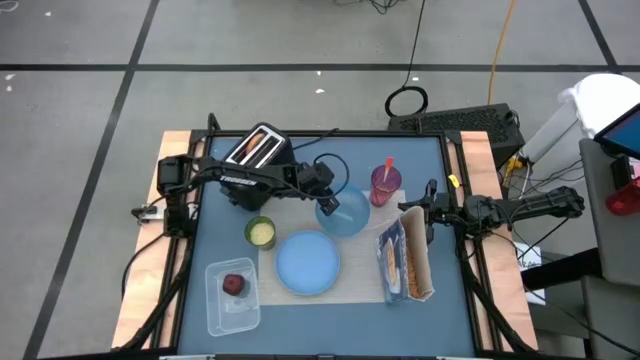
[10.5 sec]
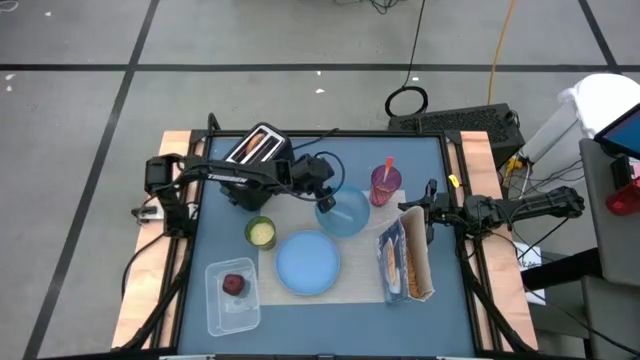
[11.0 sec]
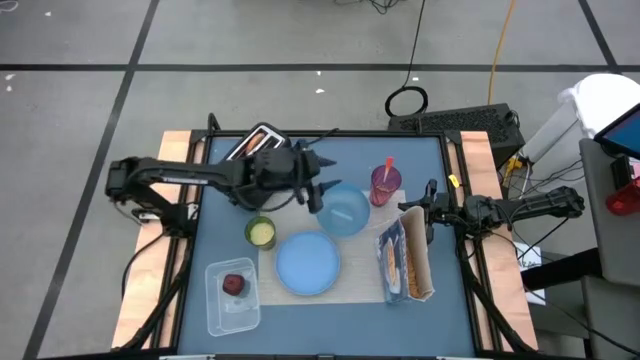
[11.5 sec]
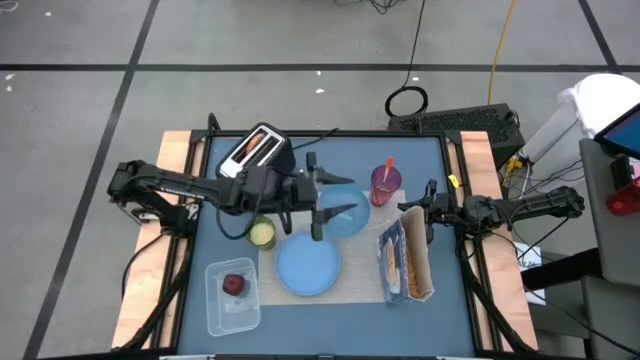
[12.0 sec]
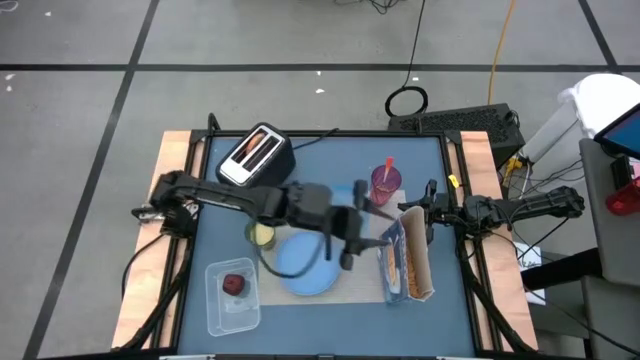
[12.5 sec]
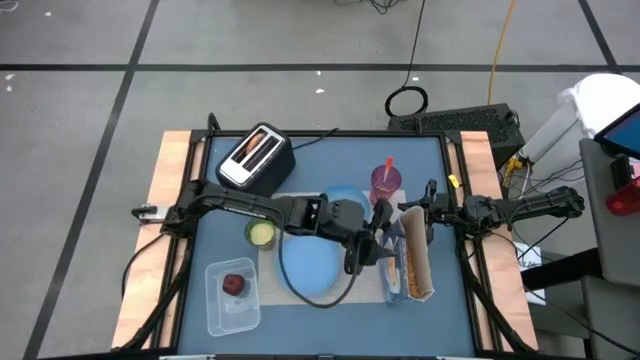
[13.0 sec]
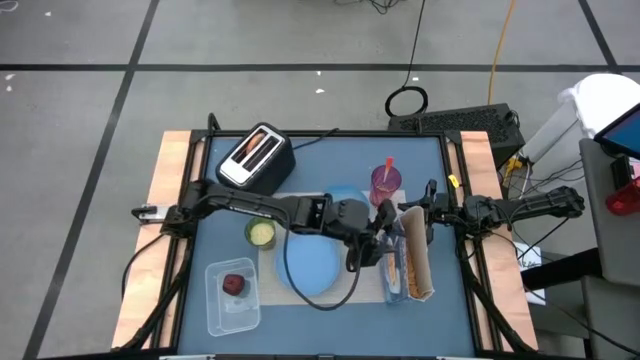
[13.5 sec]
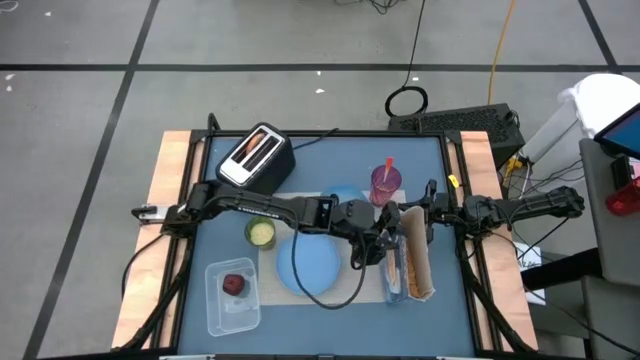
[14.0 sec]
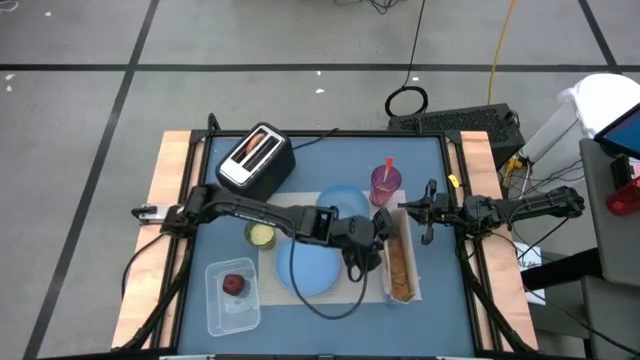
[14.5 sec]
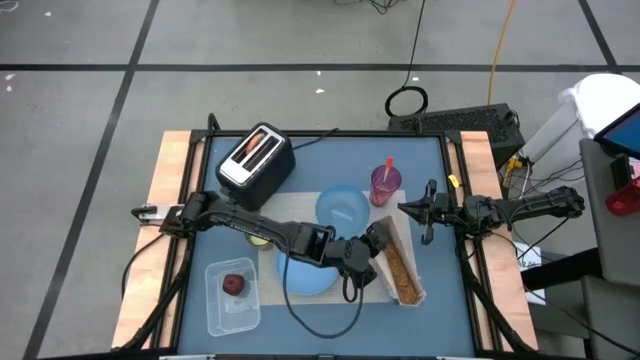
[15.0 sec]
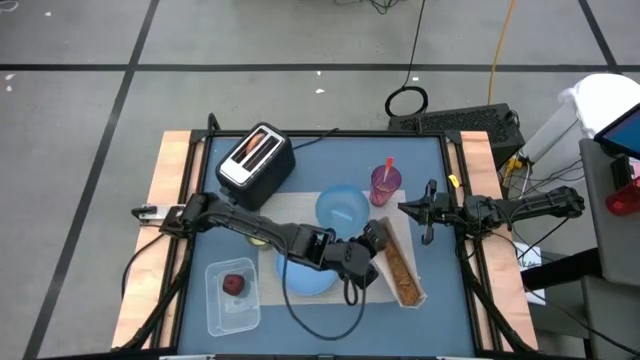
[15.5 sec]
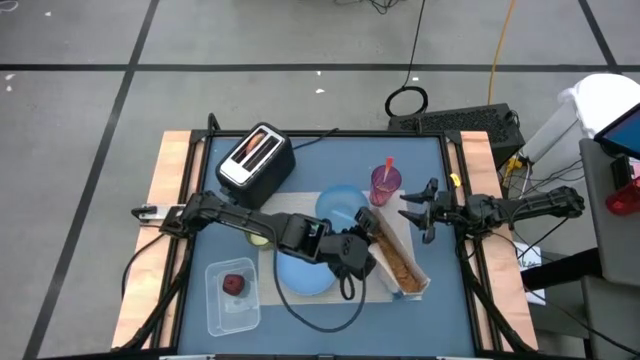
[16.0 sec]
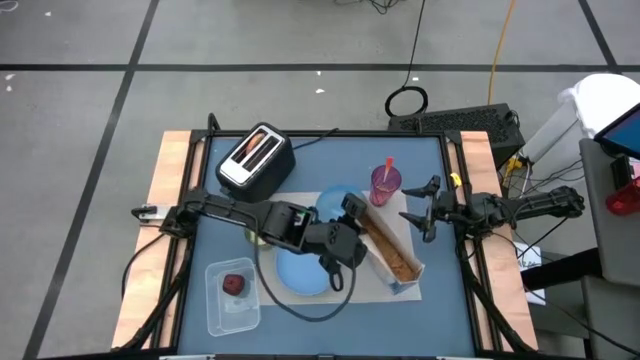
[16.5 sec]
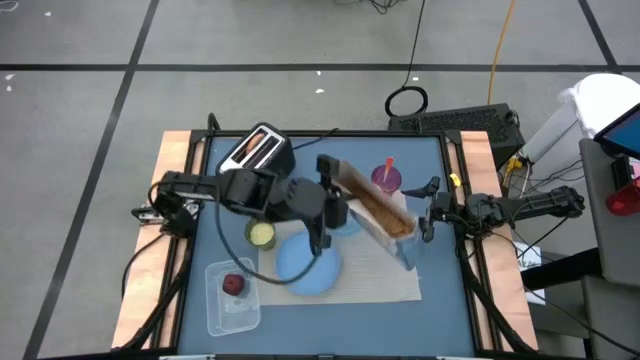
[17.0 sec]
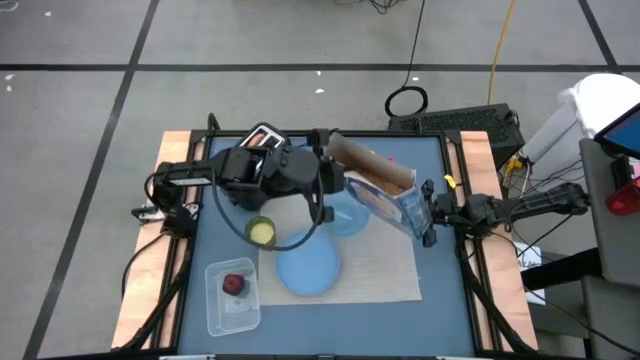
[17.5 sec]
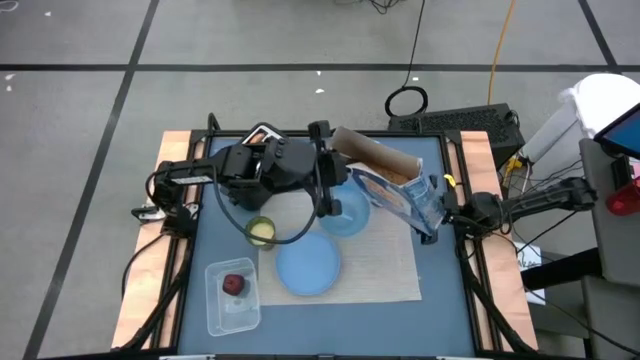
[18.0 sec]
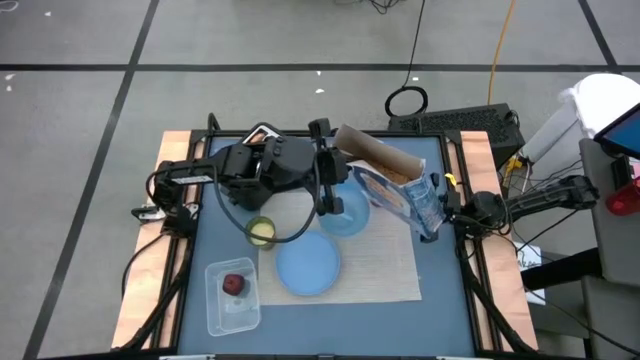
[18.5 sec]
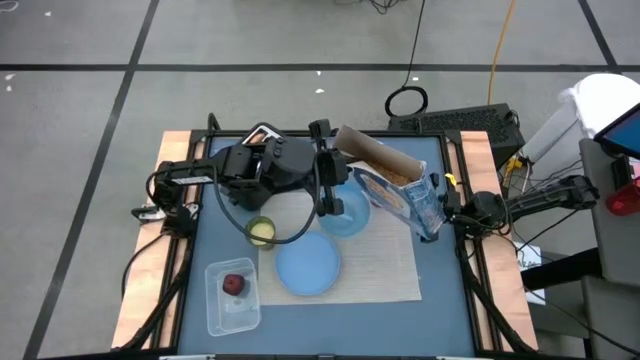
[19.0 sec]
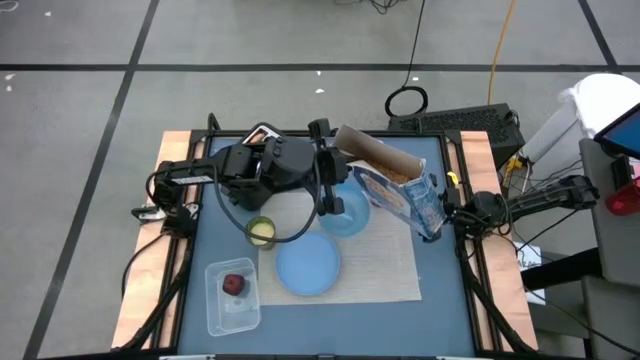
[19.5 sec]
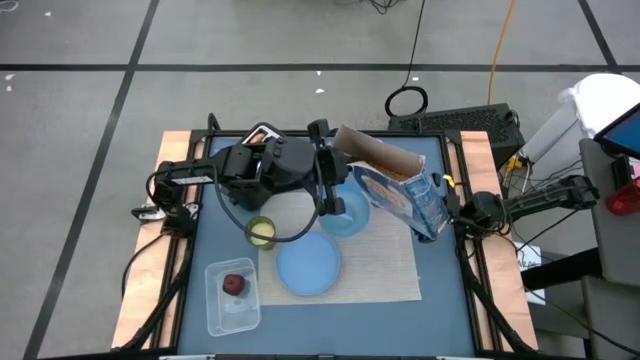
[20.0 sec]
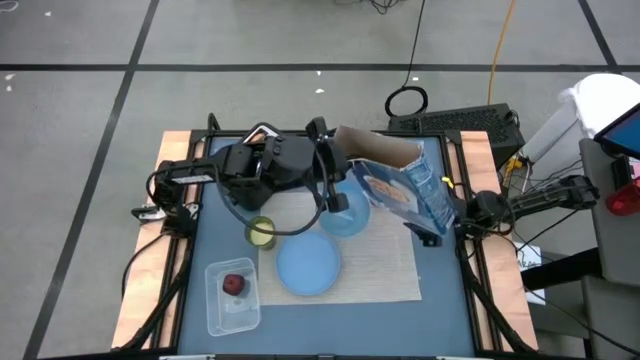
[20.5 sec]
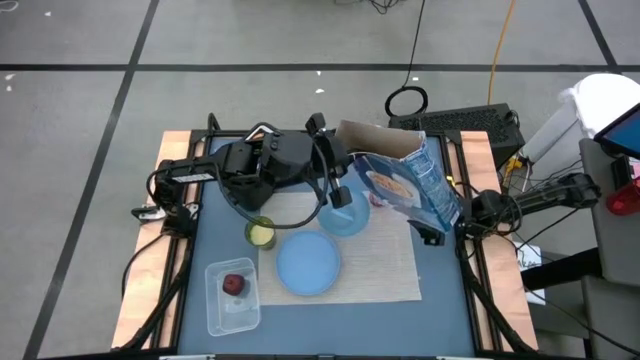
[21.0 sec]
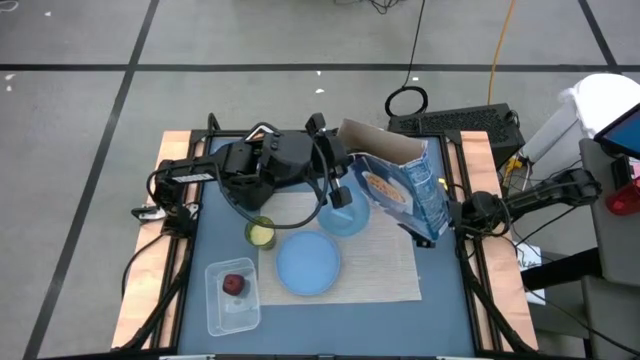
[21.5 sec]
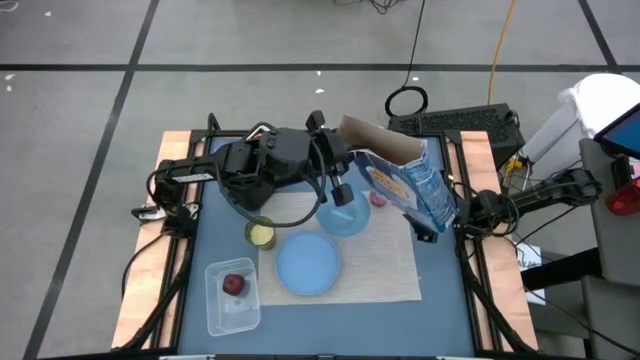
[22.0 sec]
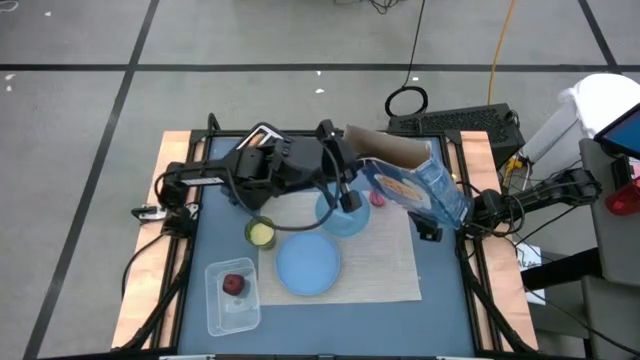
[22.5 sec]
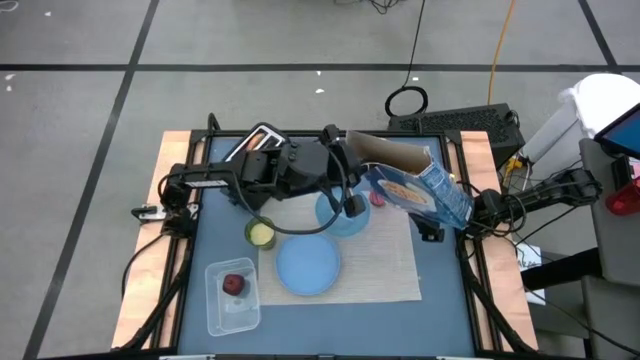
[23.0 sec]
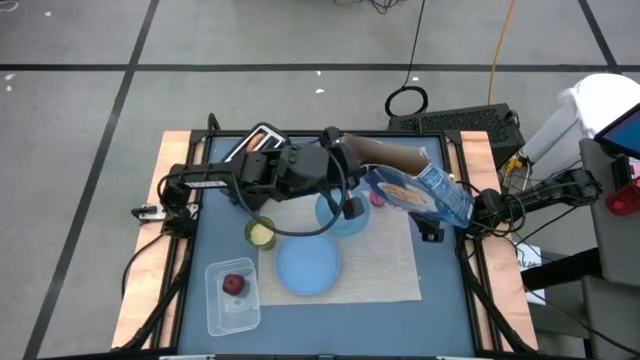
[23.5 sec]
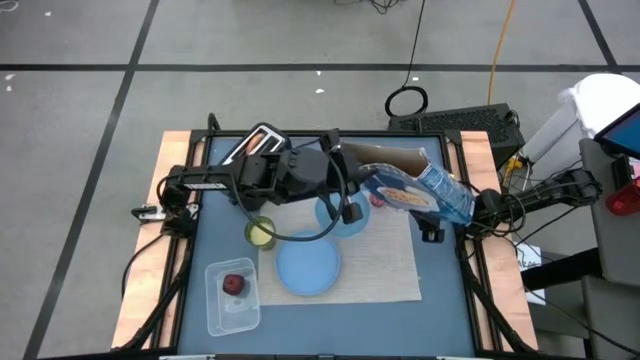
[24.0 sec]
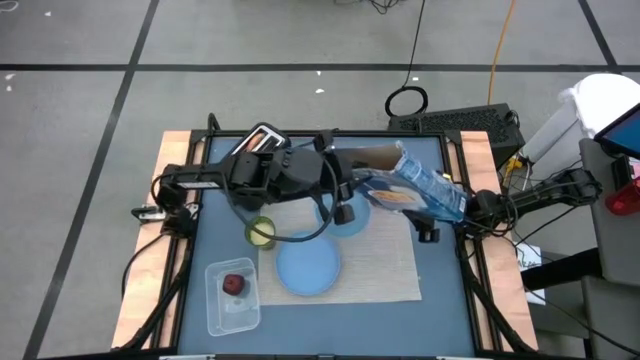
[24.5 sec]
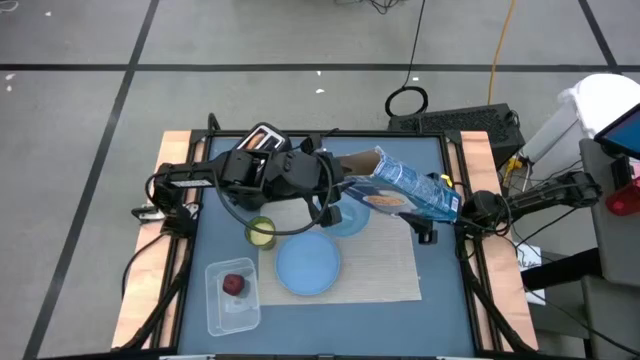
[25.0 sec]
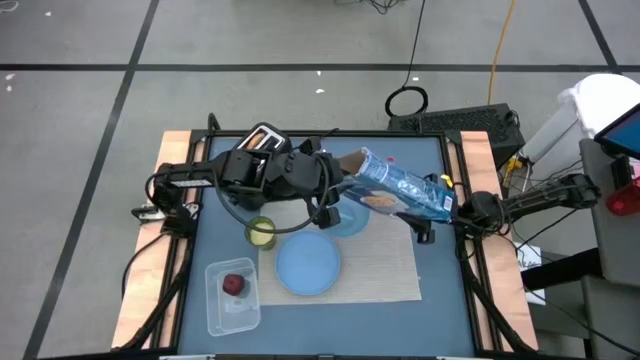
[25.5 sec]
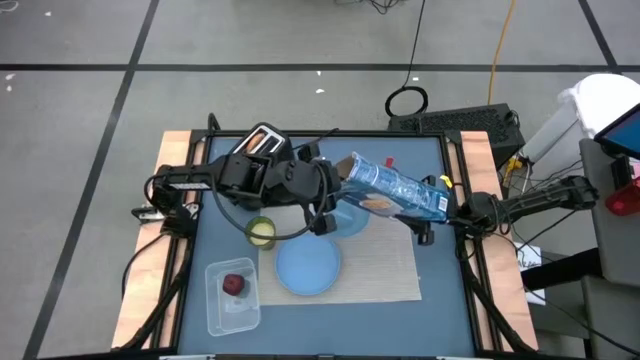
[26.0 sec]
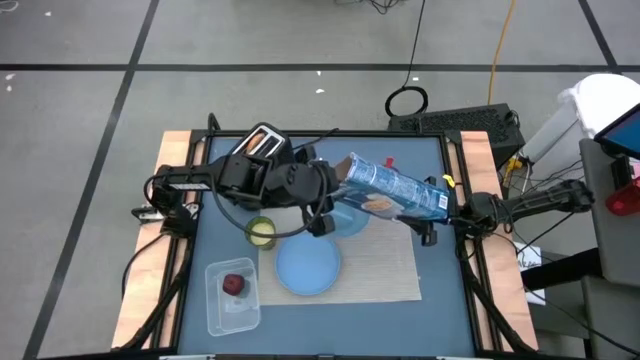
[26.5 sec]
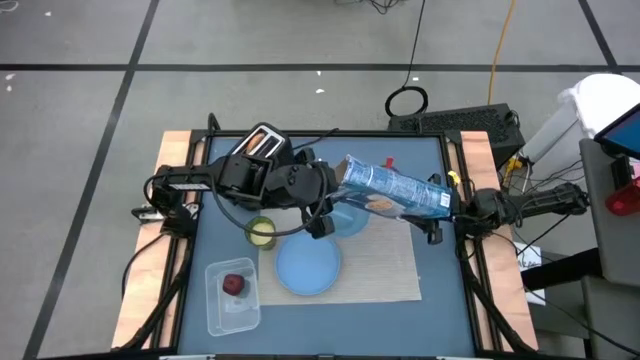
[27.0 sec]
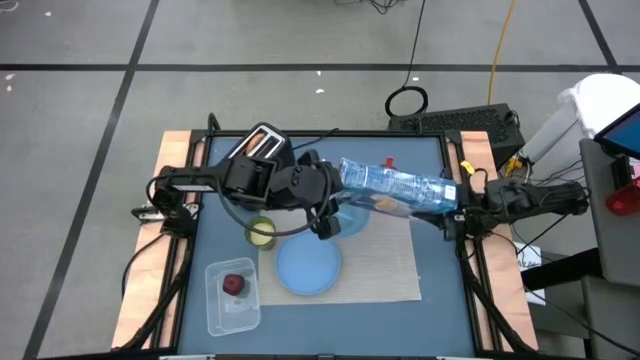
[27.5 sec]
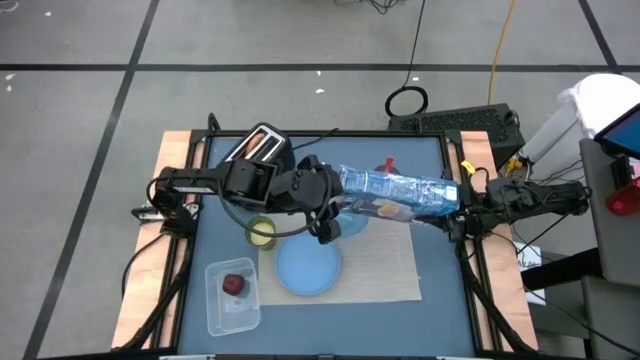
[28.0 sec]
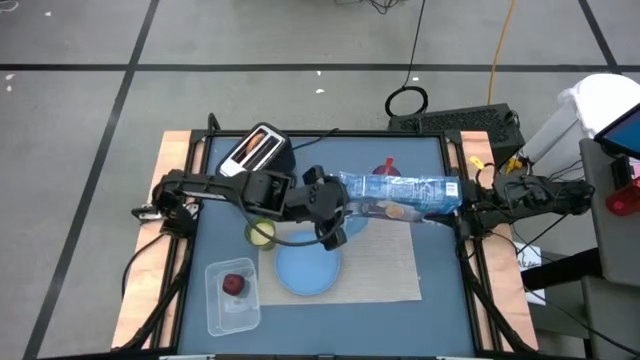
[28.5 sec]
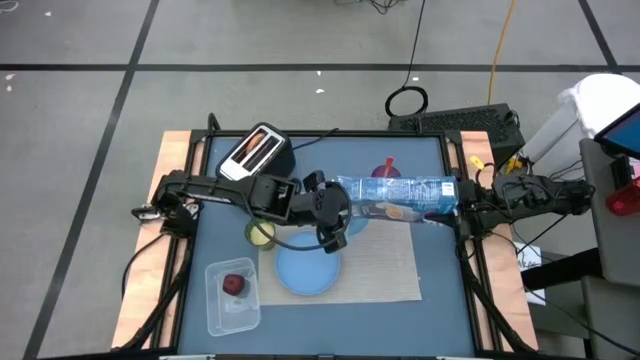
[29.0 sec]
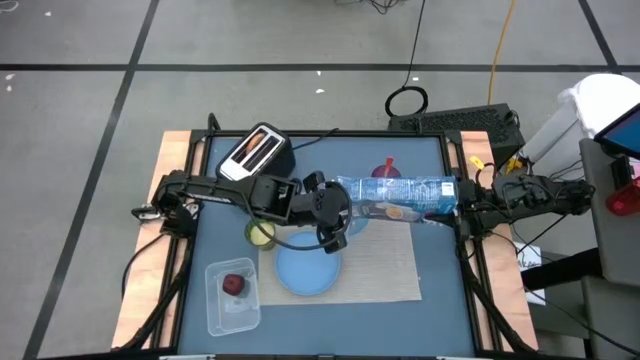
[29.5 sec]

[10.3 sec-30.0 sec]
Task: Arrange a breakfast setting
Pour the cereal into the light blue bowl

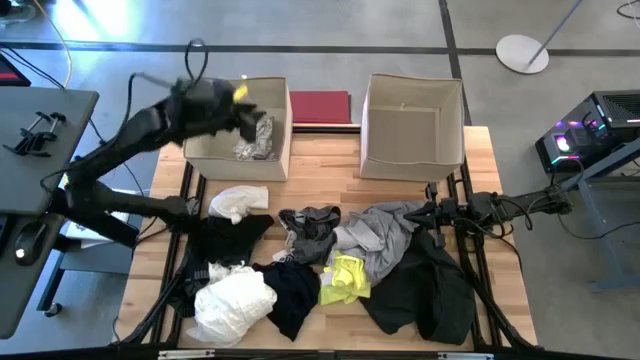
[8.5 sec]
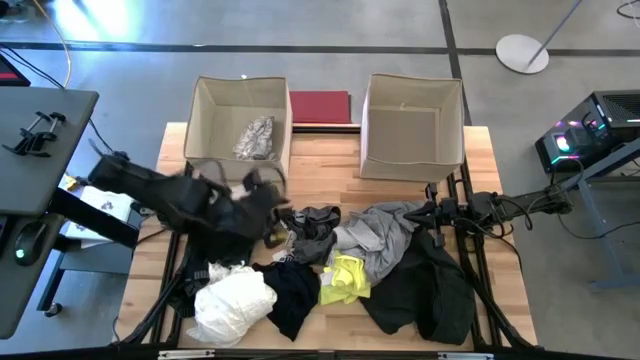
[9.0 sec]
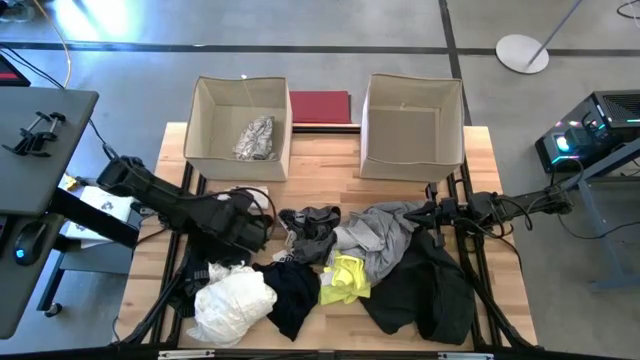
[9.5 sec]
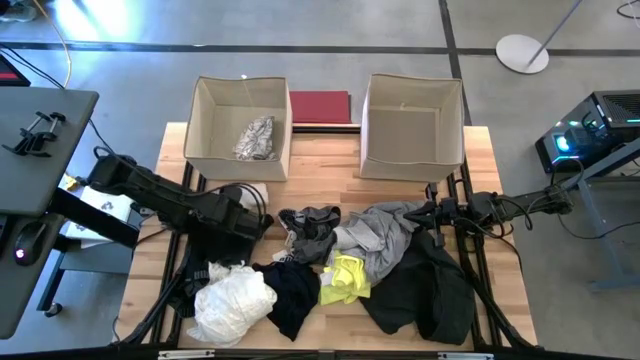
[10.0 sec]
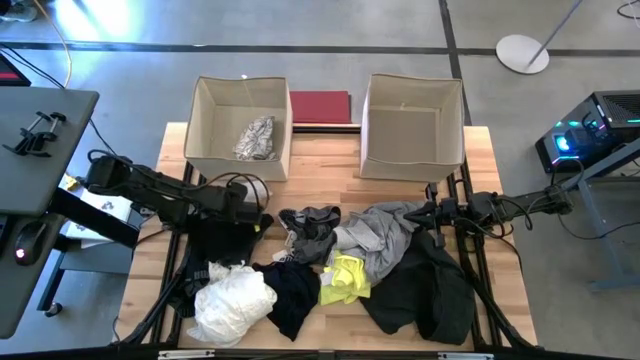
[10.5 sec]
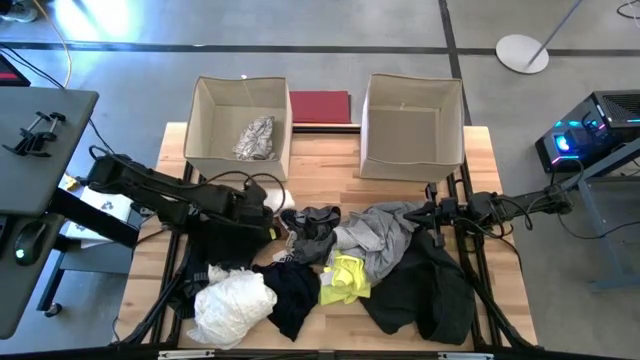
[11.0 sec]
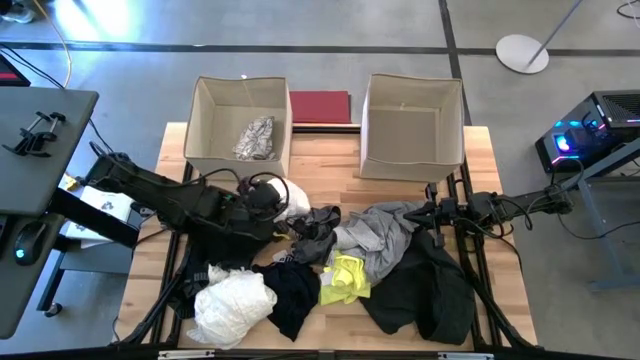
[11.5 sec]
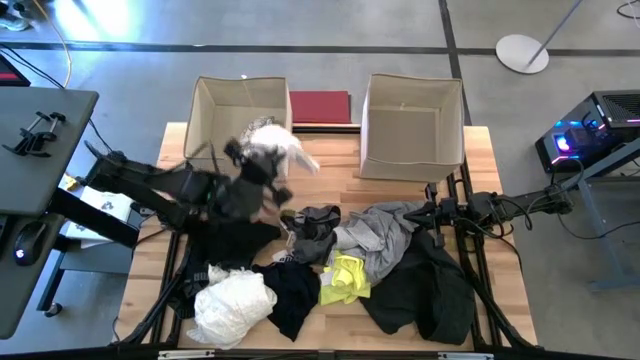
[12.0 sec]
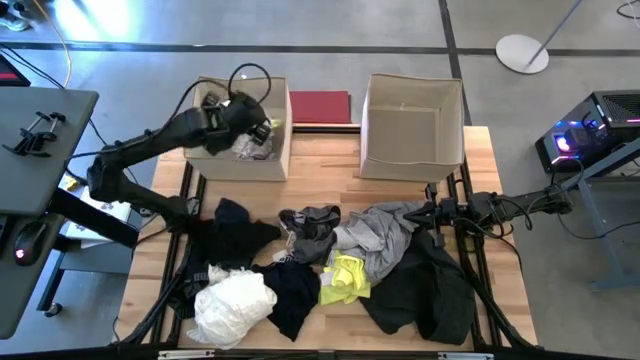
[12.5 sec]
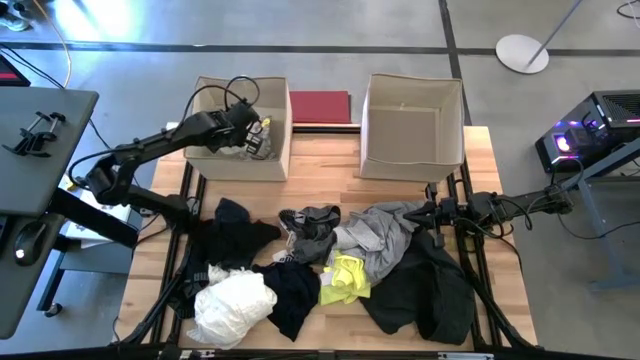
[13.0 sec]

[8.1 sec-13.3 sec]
Task: Sort clothes
Put the white piece of clothing into the left brown laundry organizer
